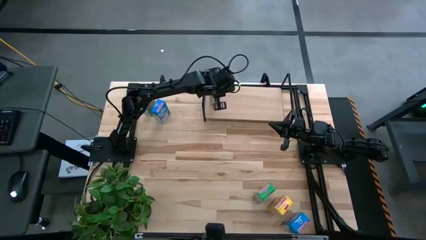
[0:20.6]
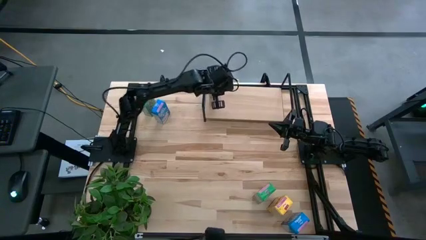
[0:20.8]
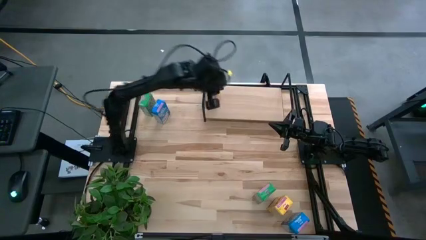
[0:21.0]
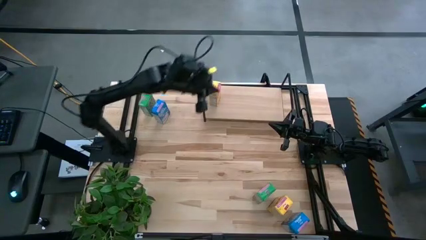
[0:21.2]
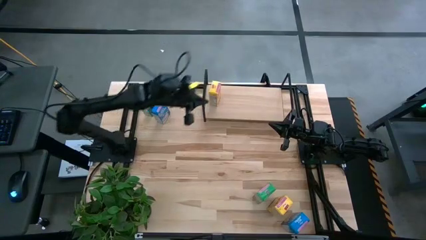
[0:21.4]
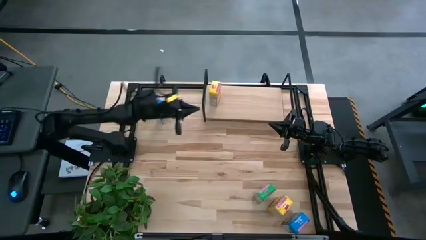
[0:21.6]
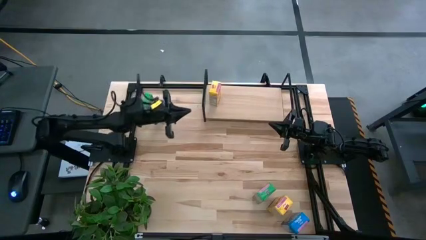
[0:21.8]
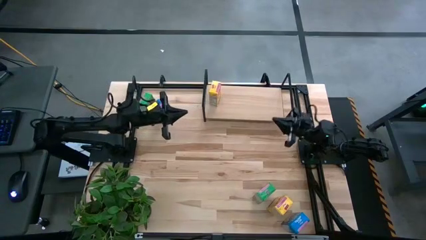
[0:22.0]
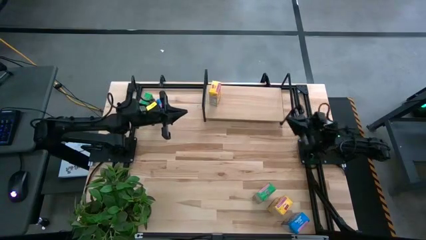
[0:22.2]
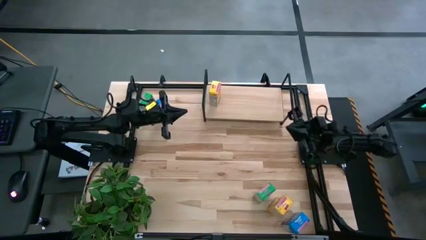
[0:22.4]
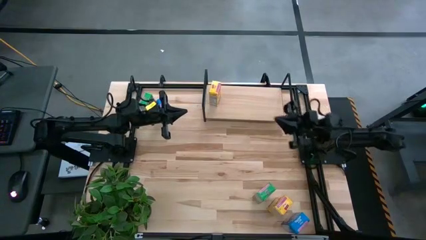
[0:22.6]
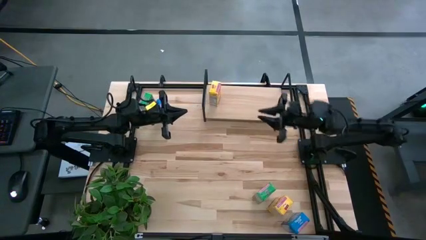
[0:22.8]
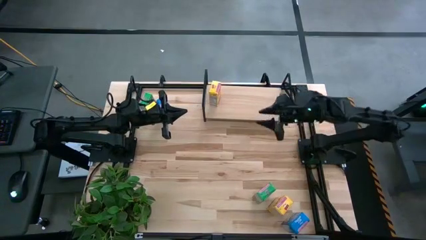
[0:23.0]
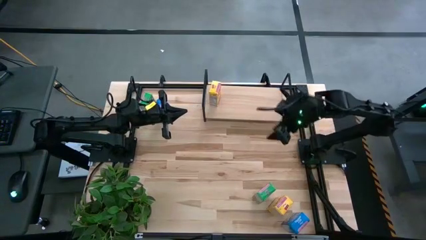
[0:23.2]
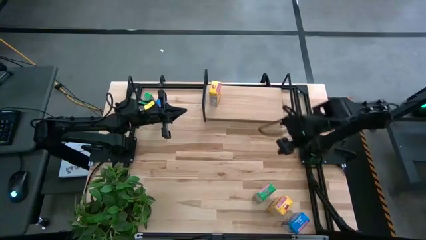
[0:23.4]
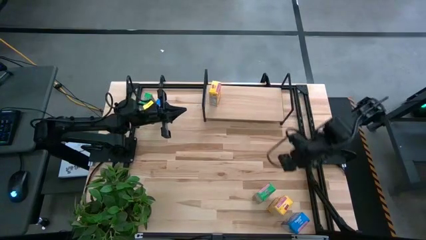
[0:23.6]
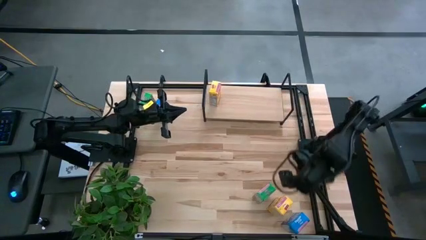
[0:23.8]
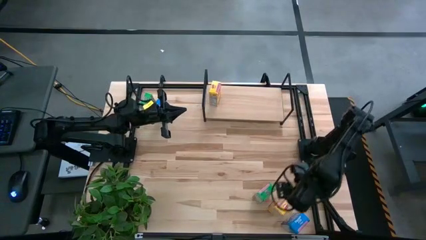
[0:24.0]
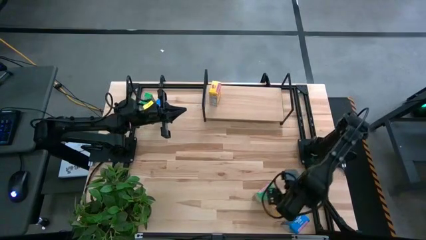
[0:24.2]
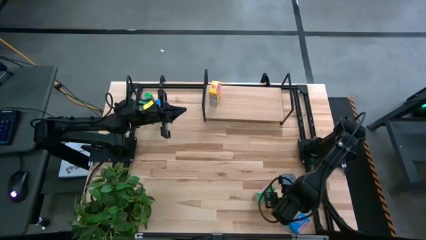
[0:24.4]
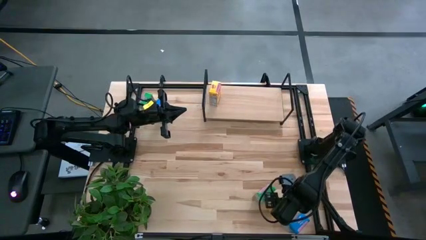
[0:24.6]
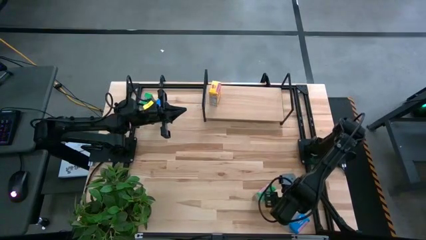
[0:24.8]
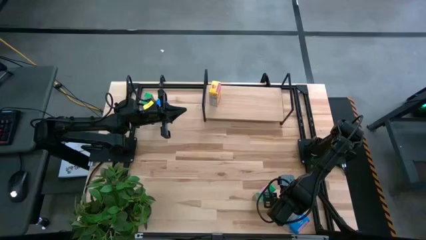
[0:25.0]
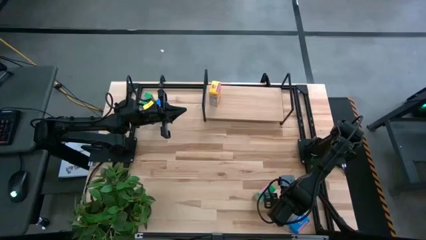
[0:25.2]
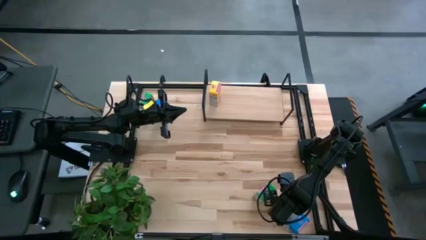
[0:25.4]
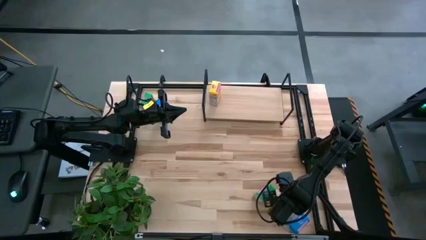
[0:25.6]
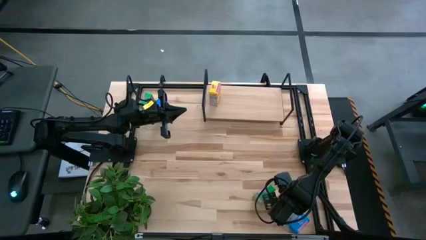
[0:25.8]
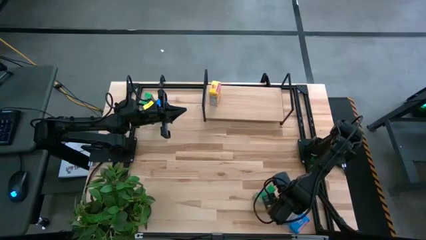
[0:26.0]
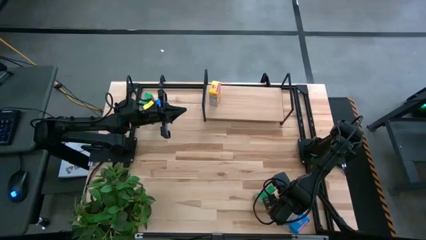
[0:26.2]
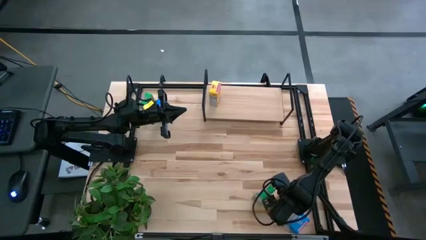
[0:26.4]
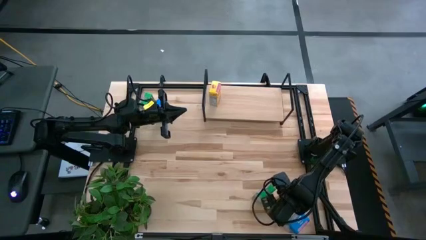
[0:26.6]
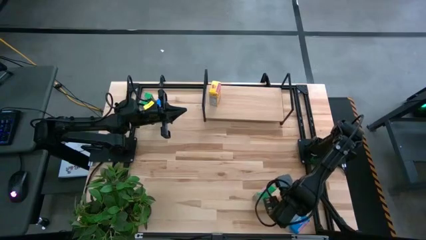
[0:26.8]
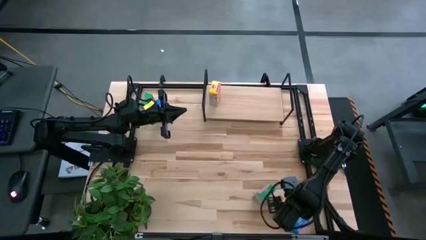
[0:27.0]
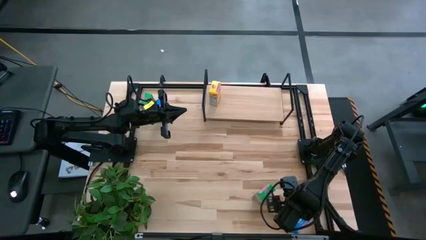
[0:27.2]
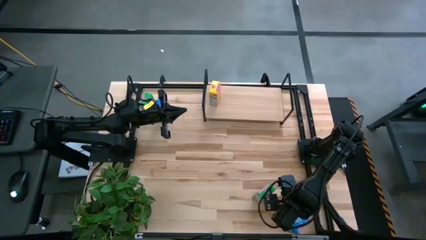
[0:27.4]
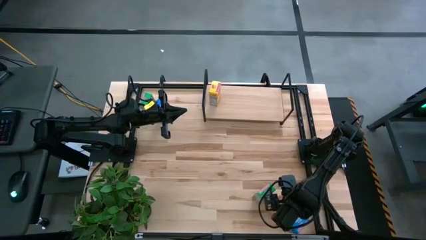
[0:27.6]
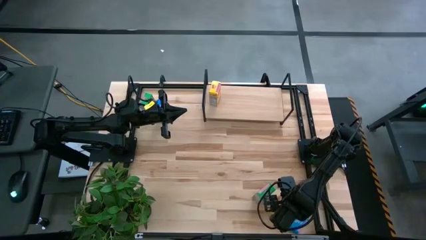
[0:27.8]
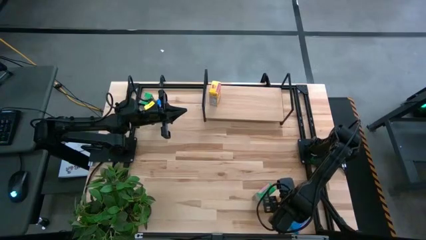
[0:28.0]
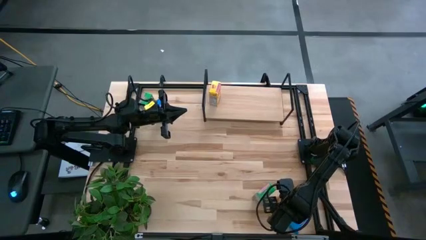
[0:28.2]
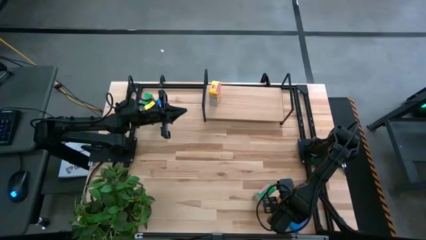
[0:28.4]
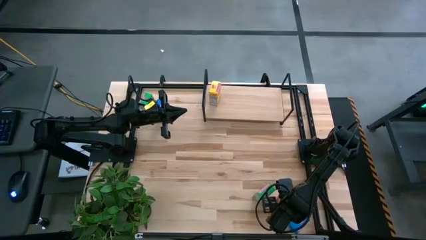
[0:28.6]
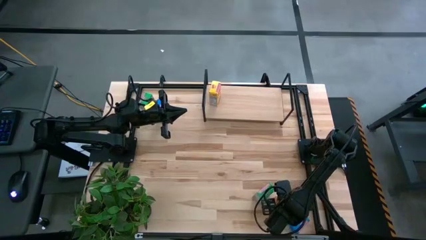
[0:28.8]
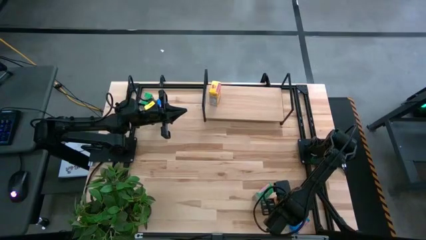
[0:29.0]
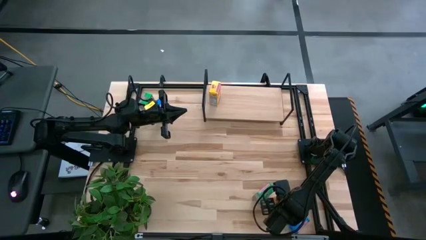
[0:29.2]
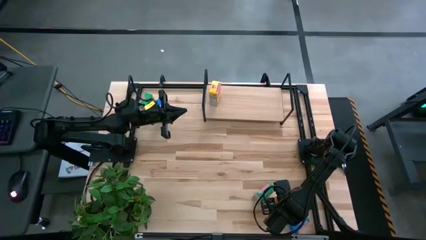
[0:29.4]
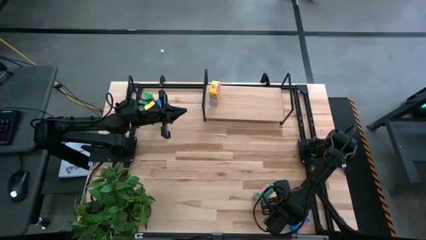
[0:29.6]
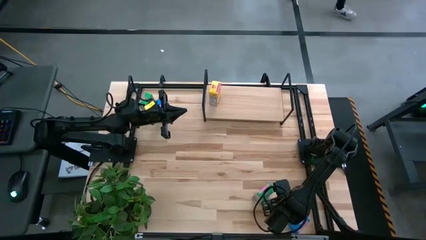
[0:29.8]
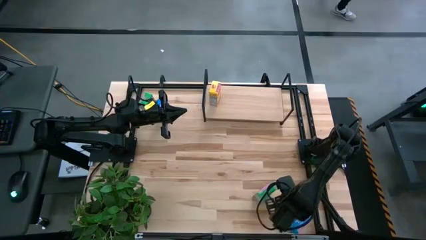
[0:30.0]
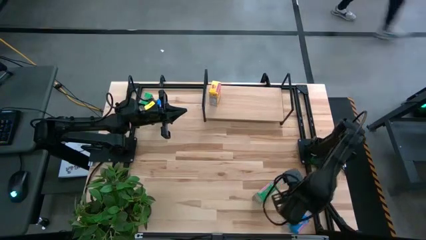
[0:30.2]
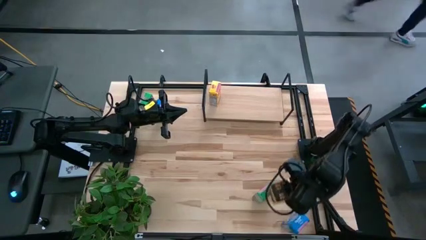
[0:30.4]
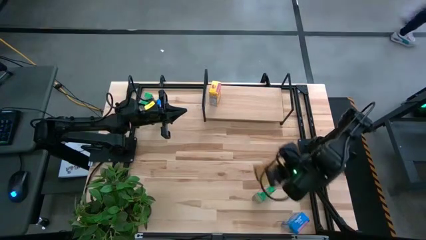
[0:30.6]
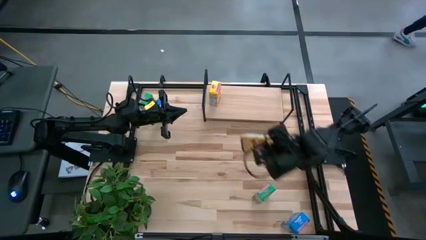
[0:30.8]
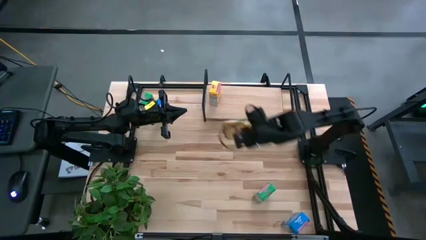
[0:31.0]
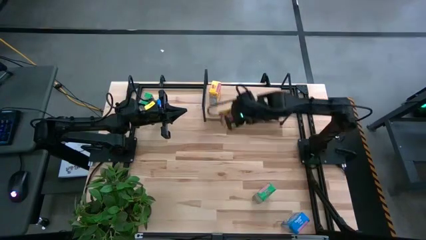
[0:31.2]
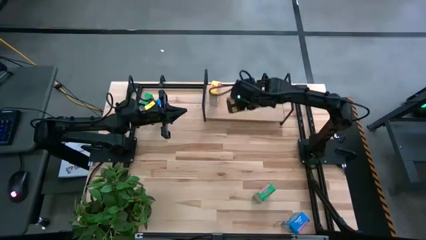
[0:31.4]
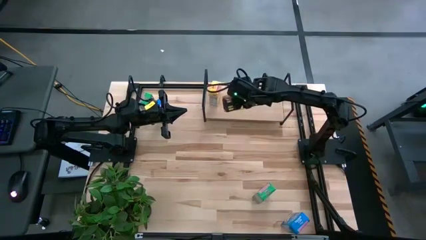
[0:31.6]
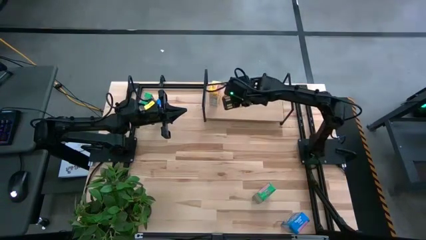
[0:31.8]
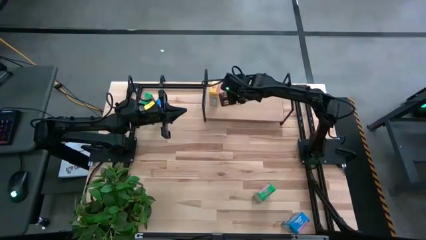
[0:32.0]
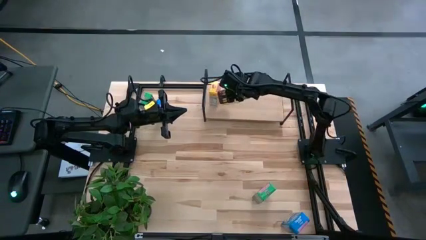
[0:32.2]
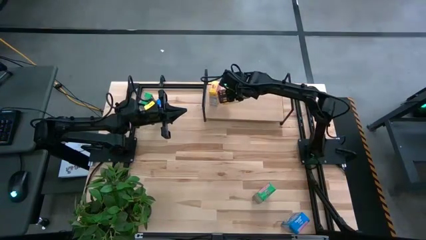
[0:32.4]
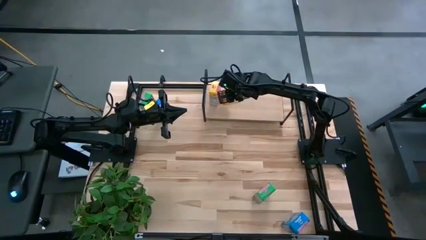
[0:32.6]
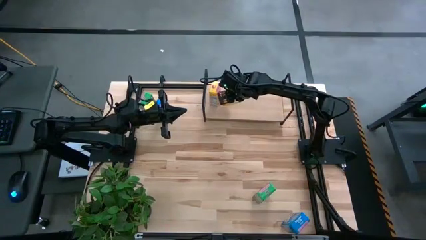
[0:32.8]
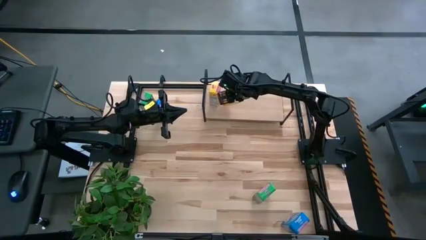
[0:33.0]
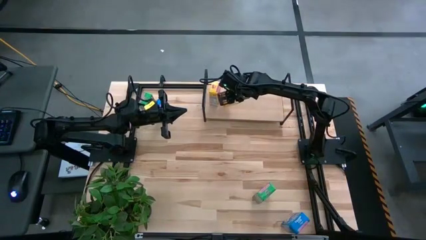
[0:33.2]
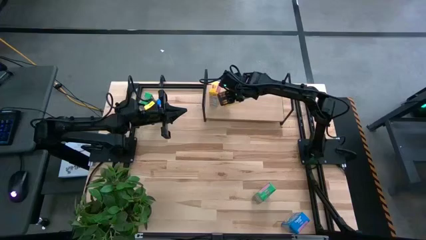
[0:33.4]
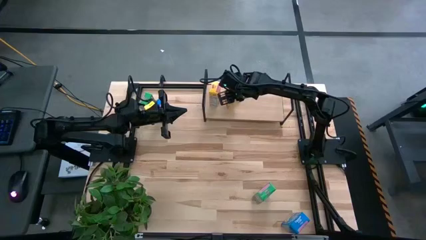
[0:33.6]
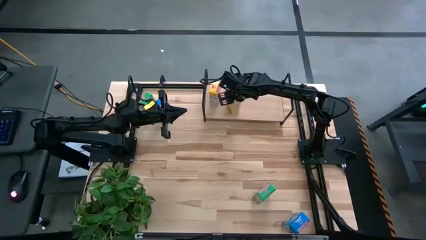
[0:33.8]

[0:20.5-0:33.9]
Task: Stack cereal on shelf
Put the yellow cereal box on the shelf
